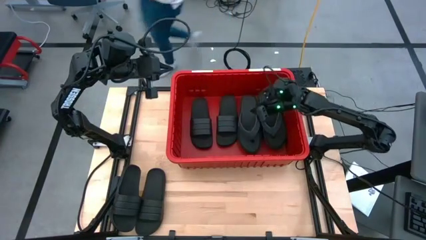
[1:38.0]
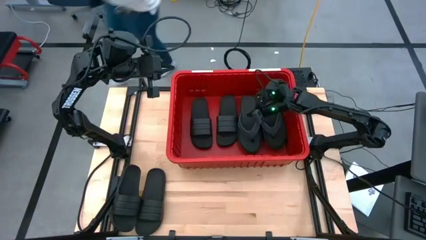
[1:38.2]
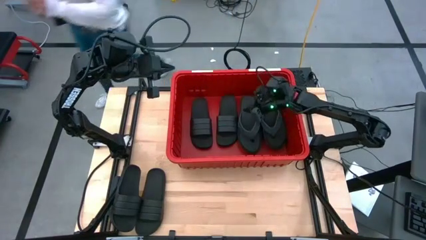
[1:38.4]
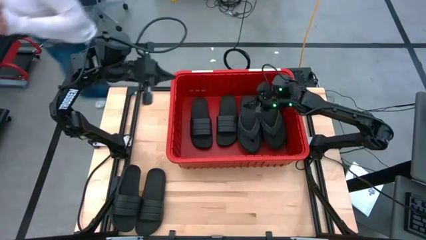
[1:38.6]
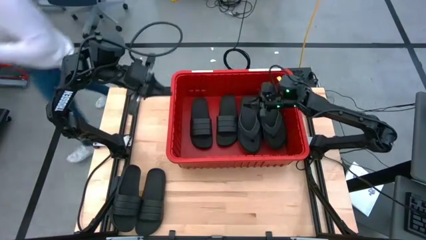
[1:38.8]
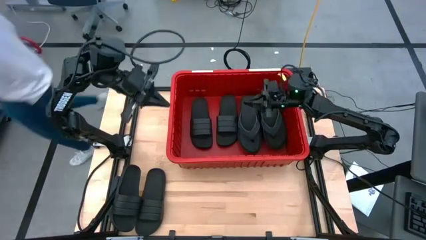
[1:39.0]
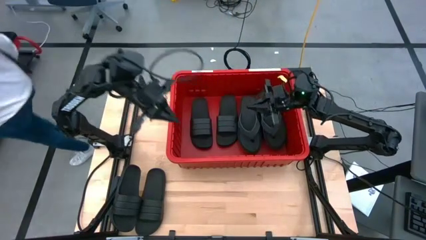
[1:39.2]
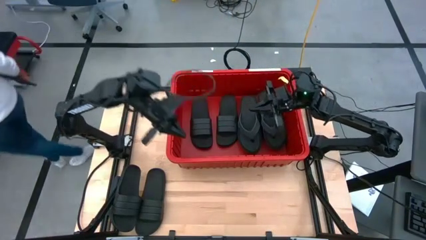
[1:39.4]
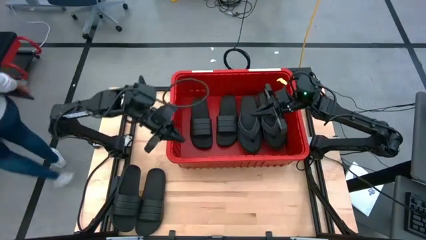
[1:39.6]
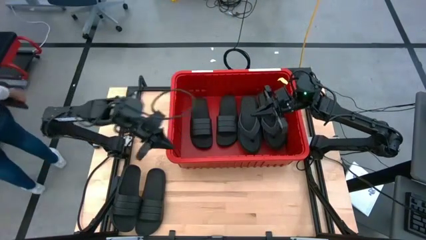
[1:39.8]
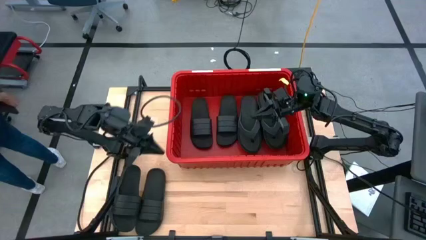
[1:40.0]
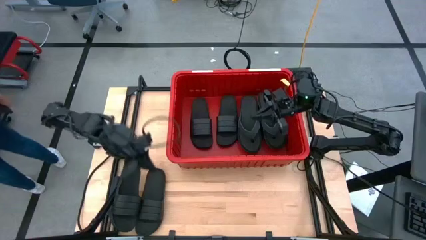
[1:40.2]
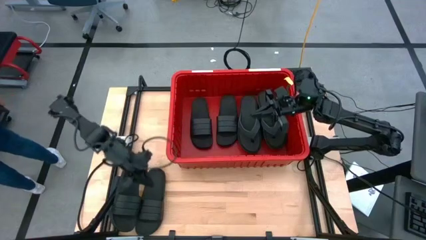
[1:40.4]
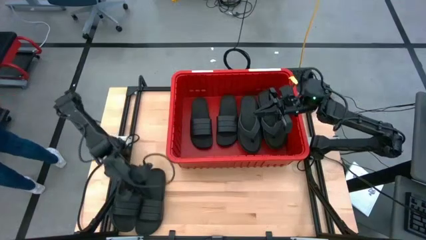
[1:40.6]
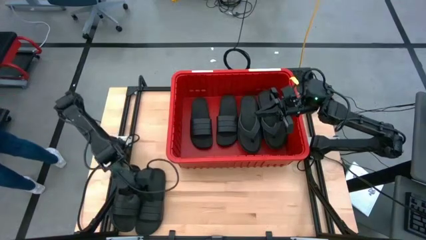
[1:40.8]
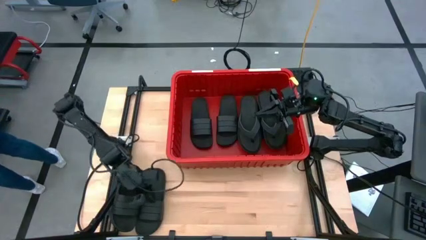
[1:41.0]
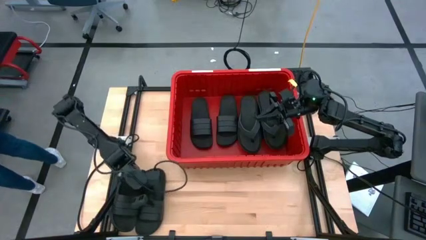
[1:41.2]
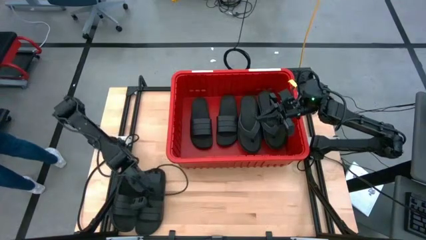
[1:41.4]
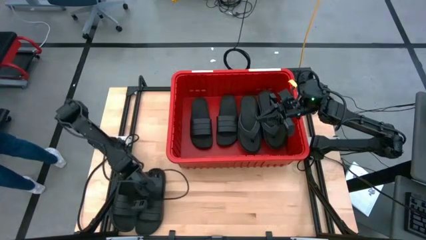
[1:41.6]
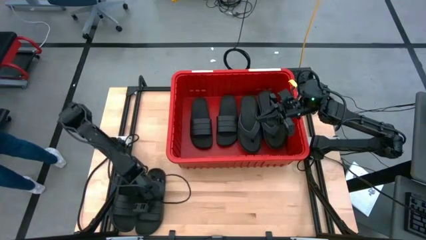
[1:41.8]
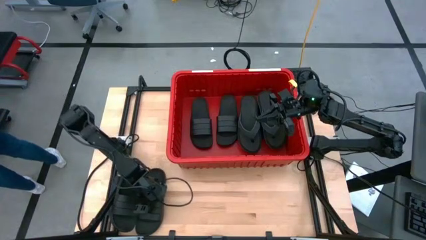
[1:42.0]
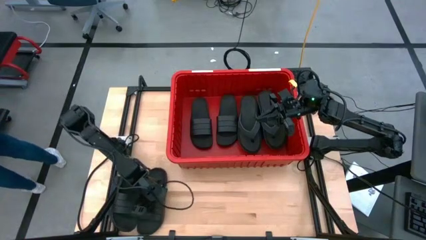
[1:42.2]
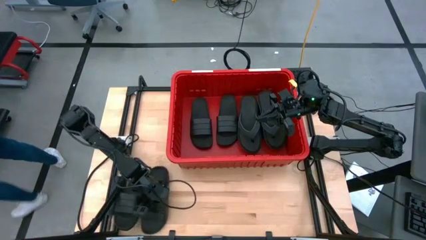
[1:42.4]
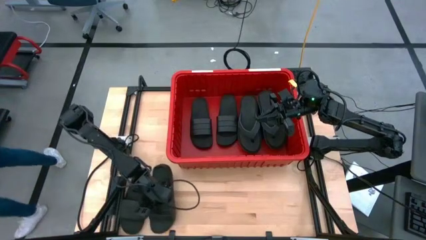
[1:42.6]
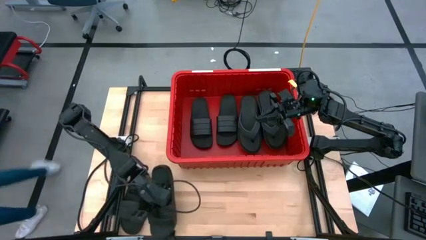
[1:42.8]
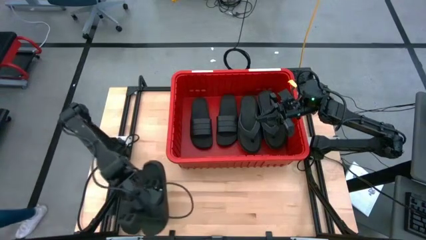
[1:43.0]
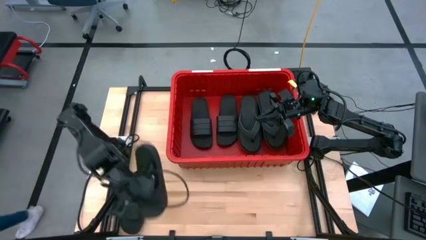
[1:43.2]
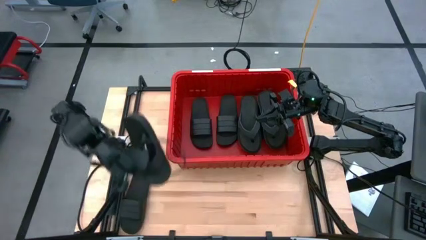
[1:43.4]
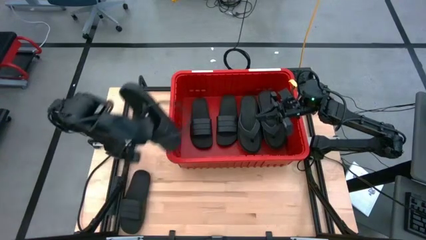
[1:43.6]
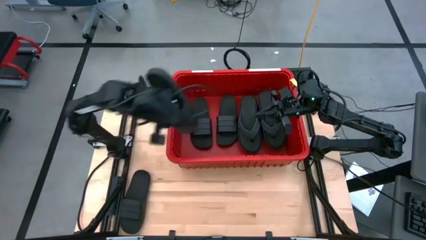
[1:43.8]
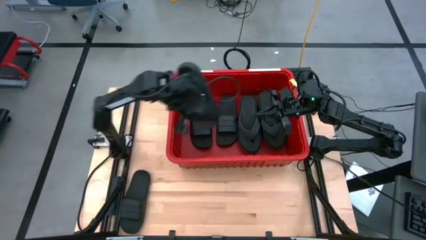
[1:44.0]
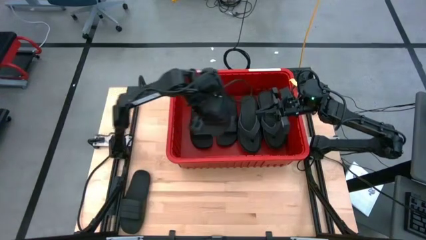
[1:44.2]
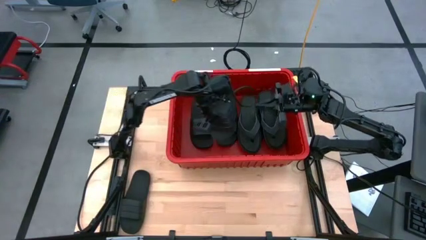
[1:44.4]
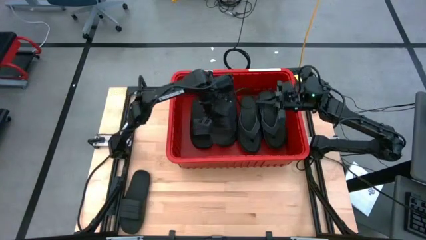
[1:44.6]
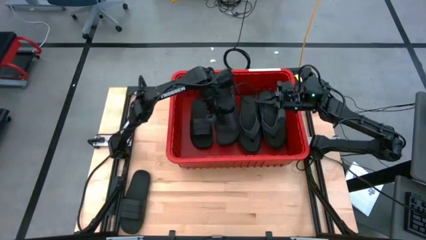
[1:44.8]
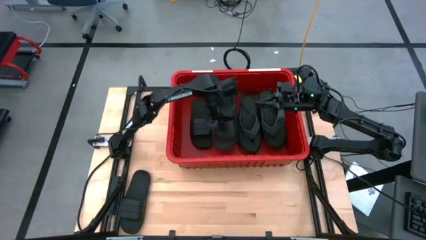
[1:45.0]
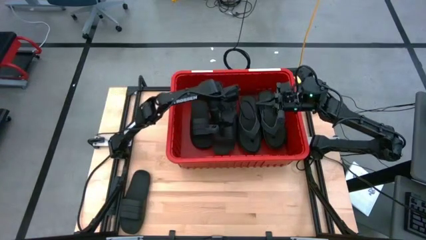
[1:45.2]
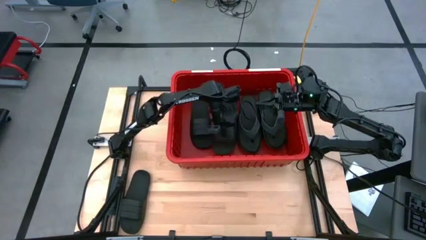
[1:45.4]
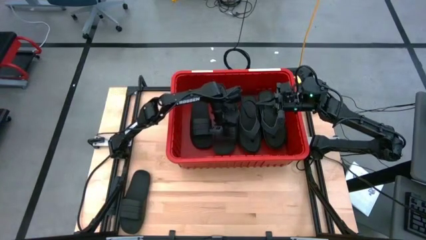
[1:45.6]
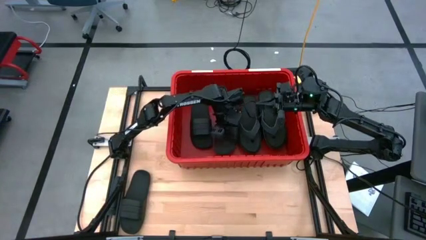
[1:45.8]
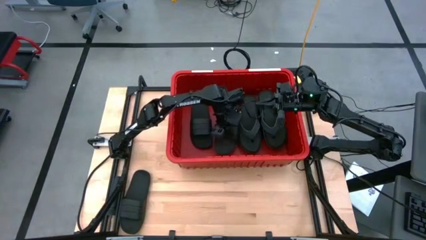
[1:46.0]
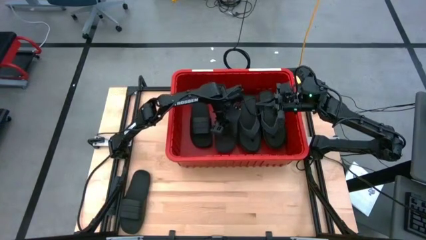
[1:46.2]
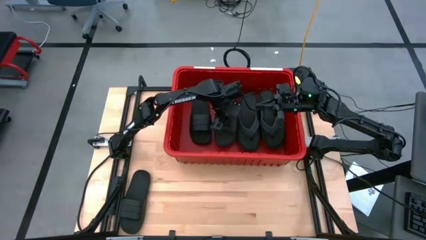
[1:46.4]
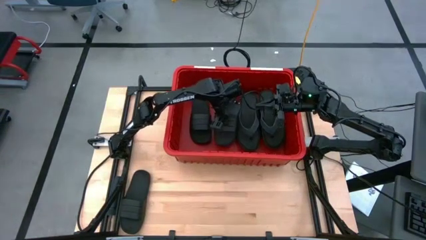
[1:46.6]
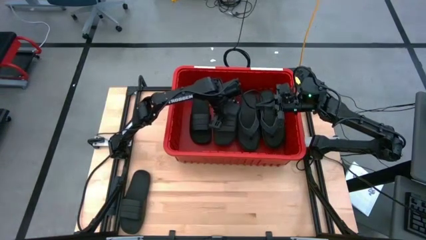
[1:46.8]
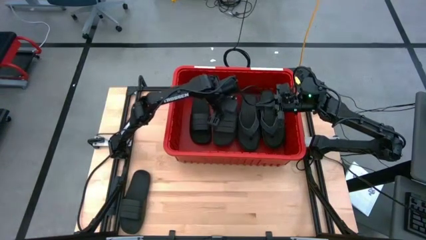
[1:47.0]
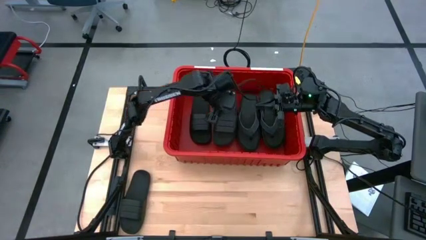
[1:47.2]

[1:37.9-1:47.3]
Task: Pick and place slides into bin
Stack the black slipper on top of the black slipper

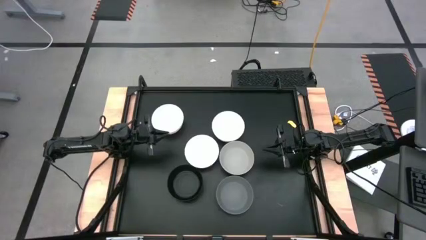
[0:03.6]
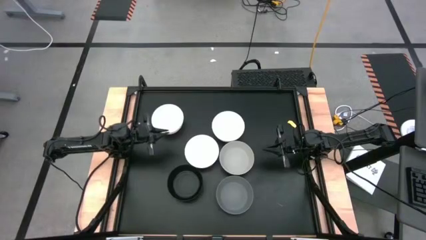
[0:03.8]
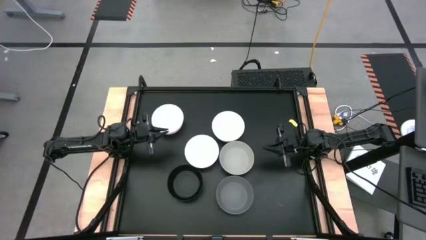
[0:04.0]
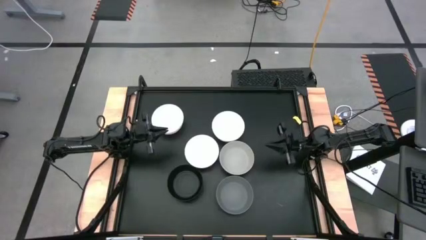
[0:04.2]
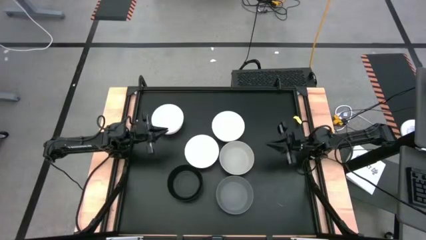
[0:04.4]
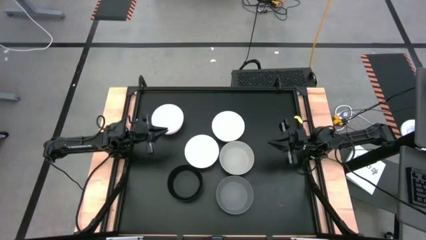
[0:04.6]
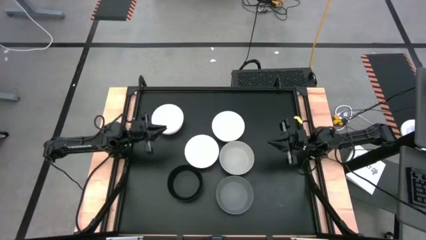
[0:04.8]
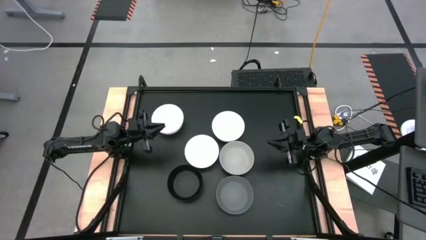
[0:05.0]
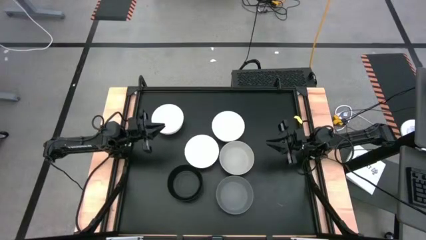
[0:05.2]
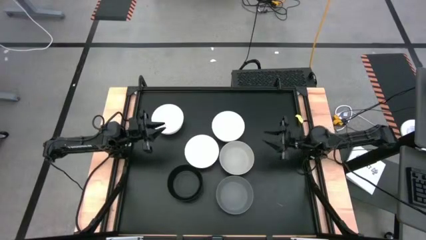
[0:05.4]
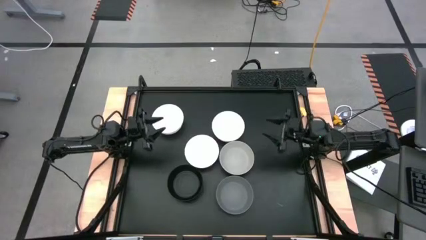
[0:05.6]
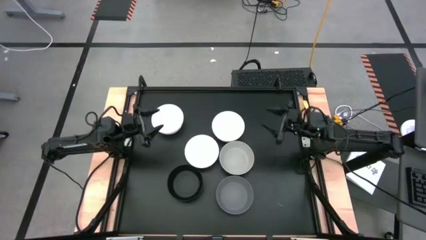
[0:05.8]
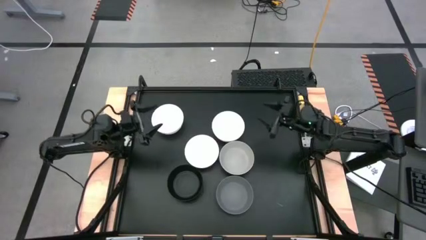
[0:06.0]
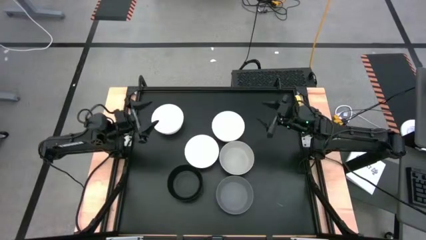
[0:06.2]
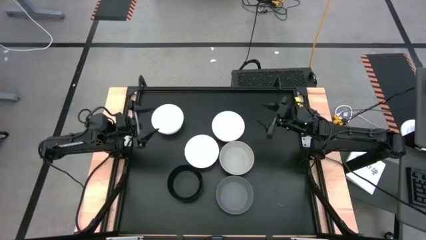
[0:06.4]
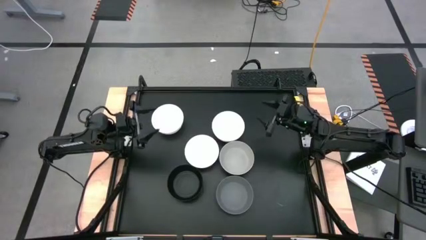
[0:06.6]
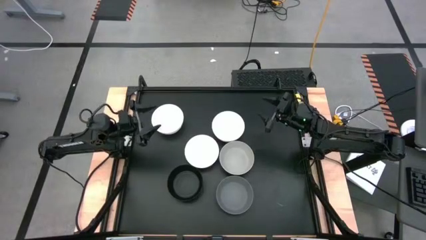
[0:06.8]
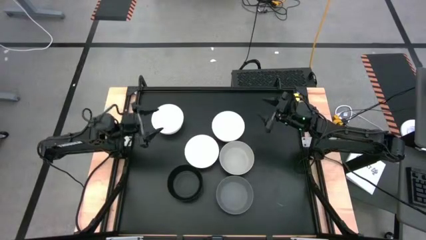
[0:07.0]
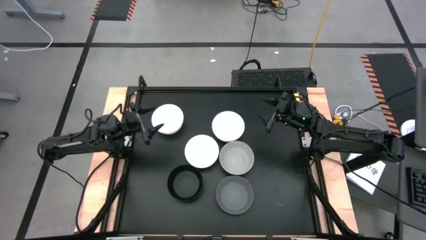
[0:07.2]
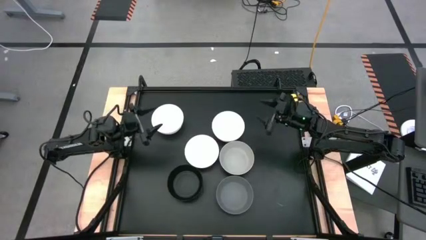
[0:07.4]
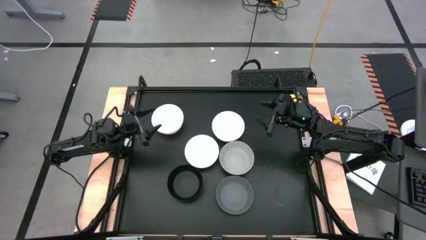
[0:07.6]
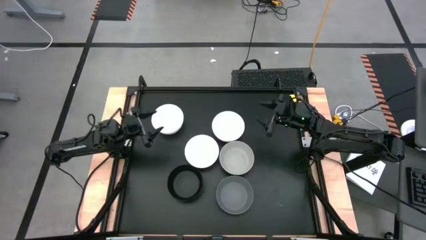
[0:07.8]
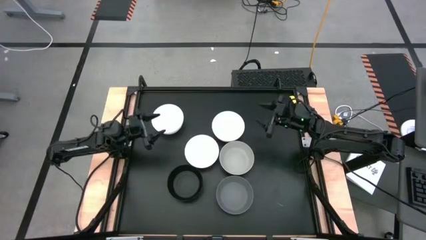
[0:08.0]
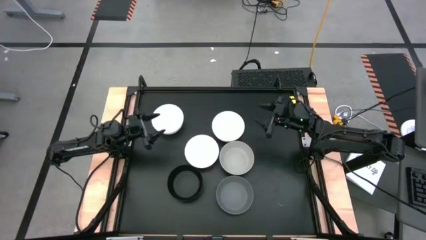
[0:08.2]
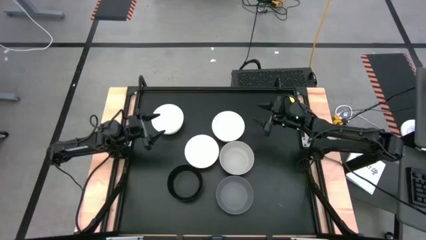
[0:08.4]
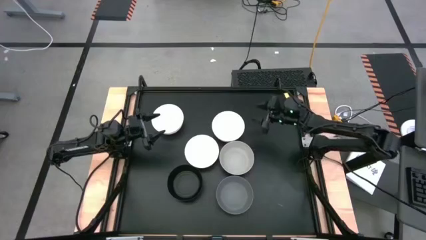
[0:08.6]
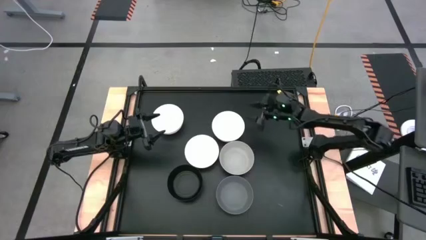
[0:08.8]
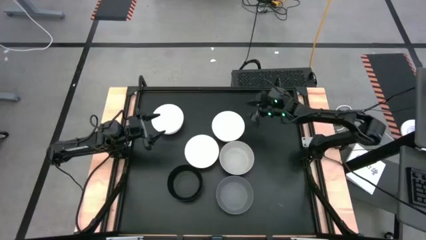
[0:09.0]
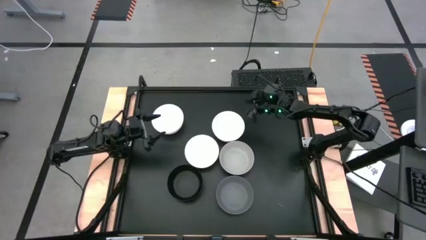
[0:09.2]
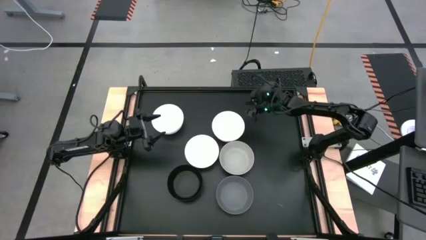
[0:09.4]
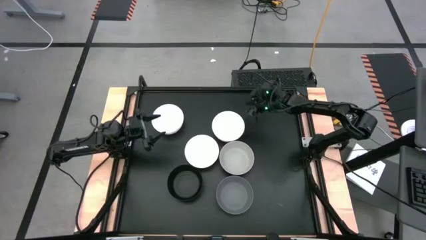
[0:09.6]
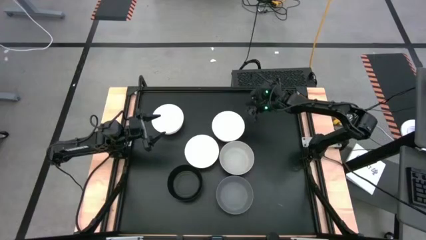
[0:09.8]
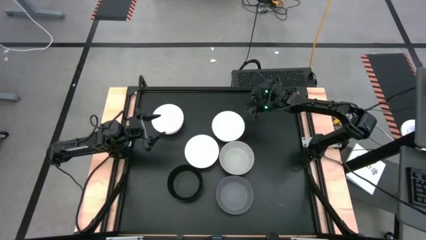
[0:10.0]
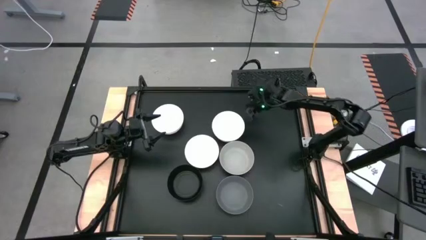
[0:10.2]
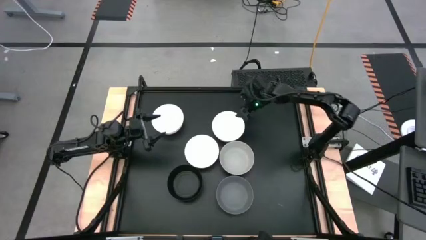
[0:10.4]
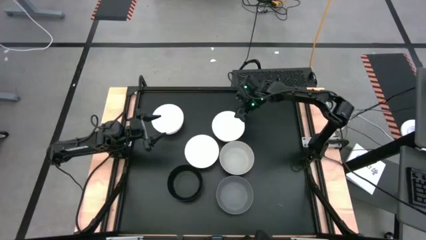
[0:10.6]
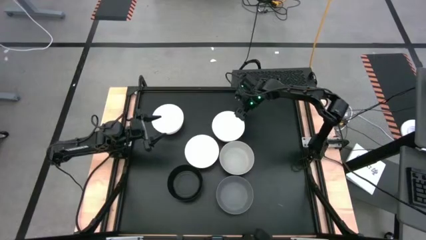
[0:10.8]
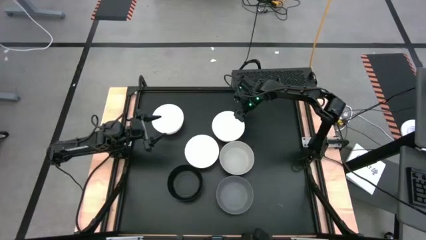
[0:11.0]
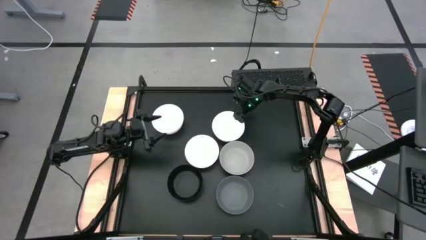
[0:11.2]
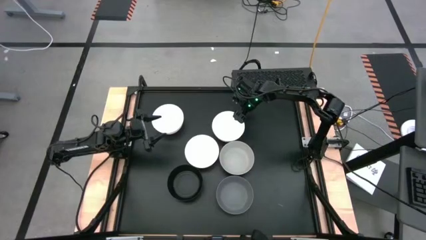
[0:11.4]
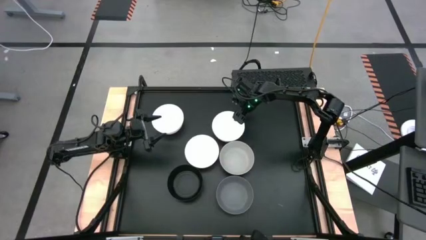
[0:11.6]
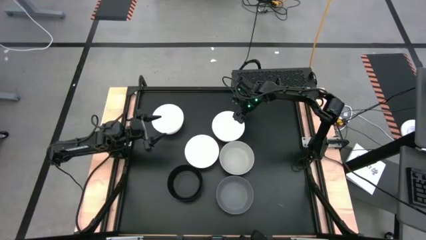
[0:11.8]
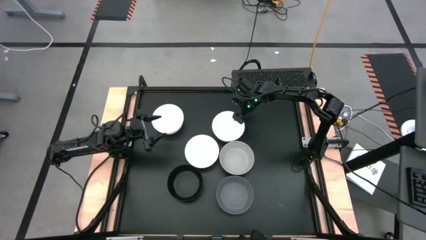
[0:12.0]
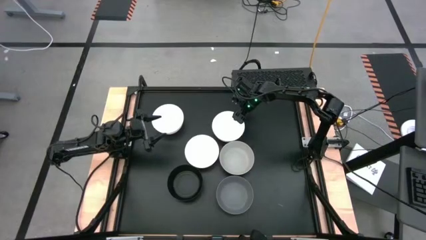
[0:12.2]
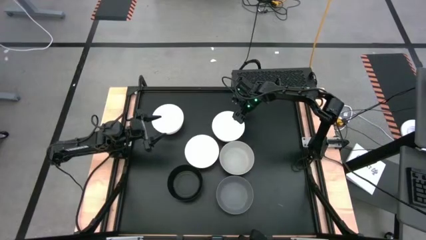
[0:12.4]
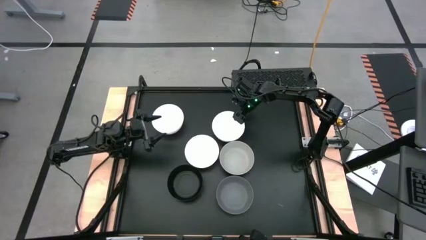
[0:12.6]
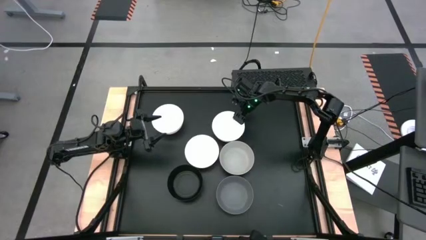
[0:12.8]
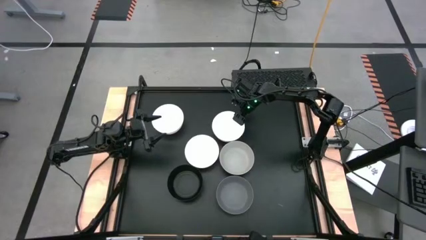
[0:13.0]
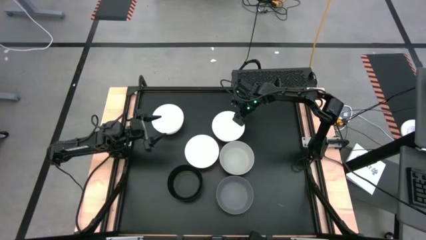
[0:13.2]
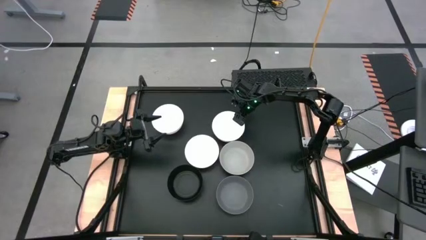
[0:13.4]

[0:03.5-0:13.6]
Task: Nest bowls inside each other
Stack the top right white bowl into the gray bowl
